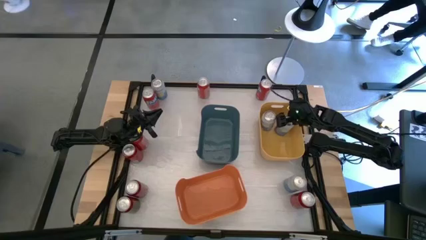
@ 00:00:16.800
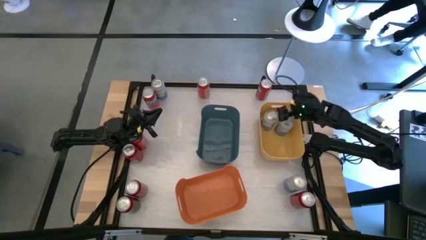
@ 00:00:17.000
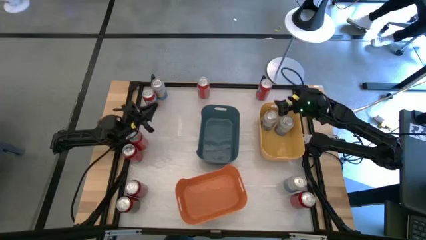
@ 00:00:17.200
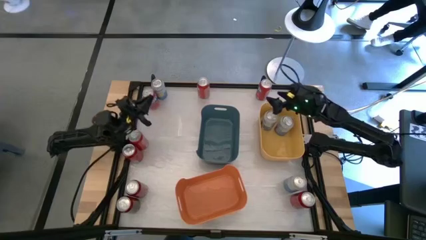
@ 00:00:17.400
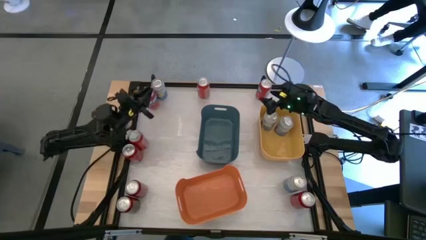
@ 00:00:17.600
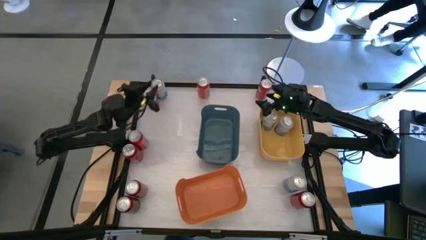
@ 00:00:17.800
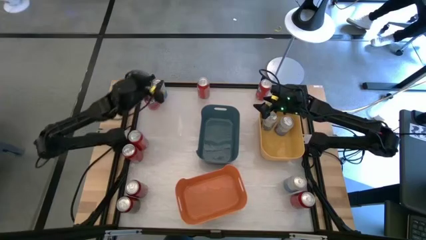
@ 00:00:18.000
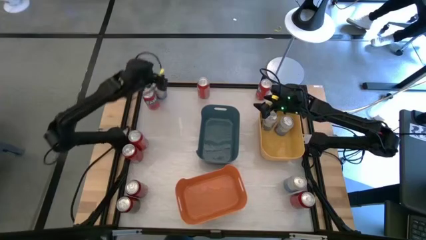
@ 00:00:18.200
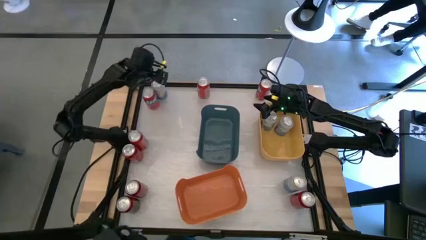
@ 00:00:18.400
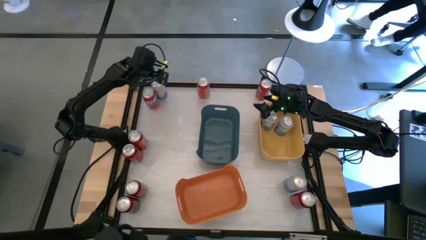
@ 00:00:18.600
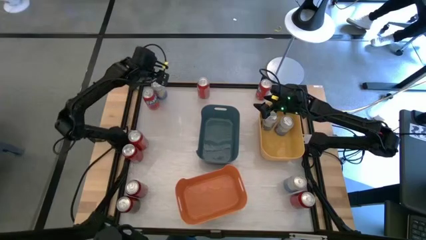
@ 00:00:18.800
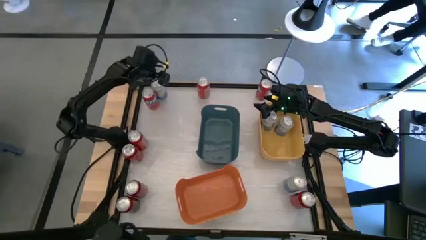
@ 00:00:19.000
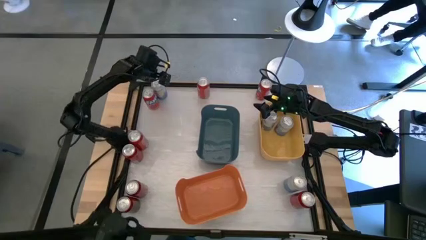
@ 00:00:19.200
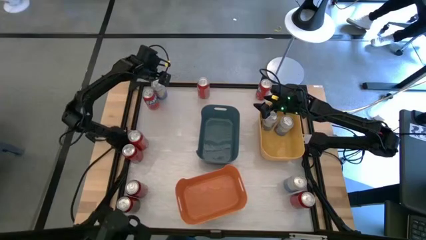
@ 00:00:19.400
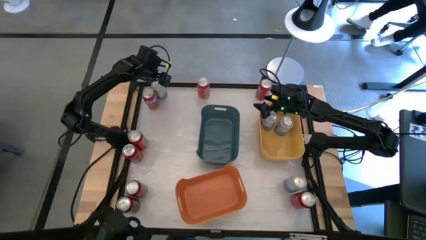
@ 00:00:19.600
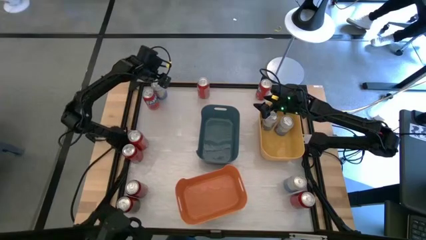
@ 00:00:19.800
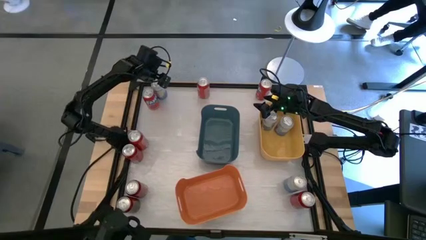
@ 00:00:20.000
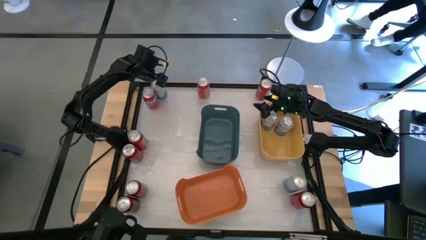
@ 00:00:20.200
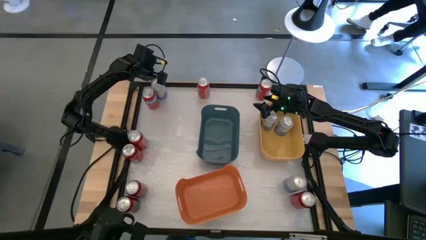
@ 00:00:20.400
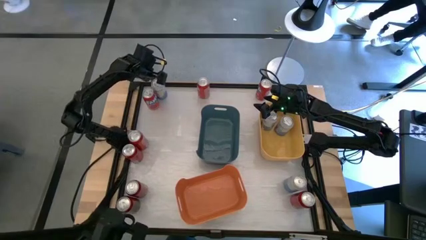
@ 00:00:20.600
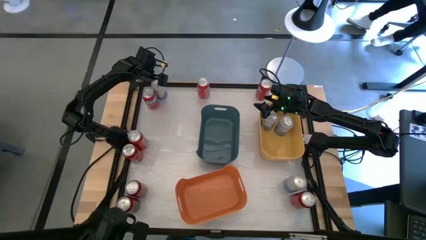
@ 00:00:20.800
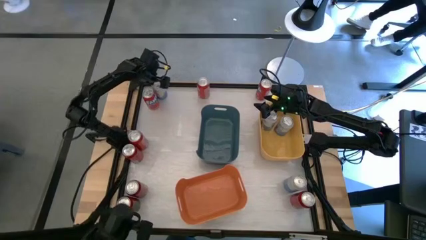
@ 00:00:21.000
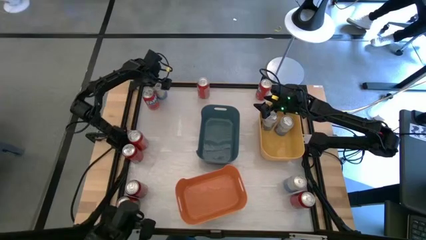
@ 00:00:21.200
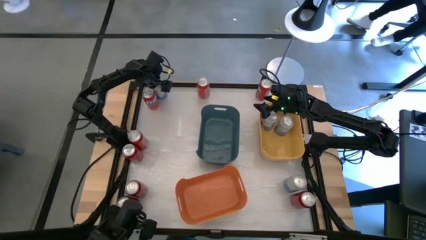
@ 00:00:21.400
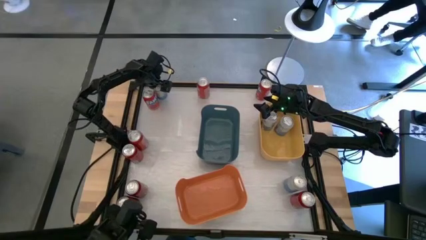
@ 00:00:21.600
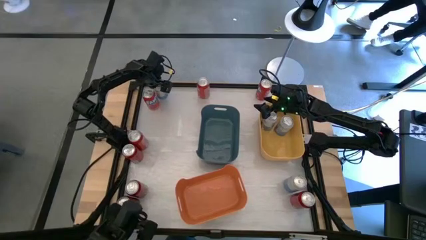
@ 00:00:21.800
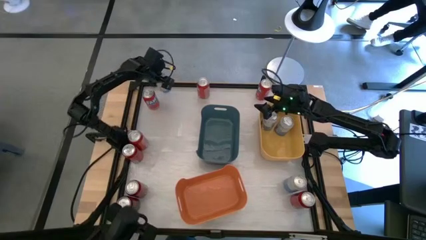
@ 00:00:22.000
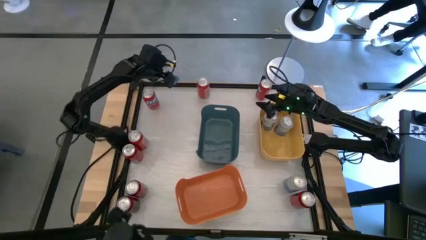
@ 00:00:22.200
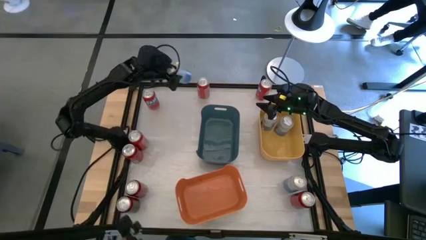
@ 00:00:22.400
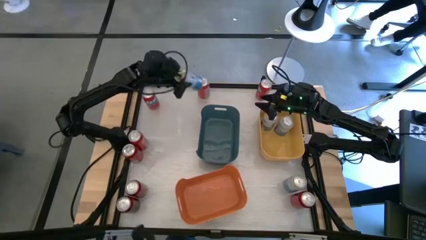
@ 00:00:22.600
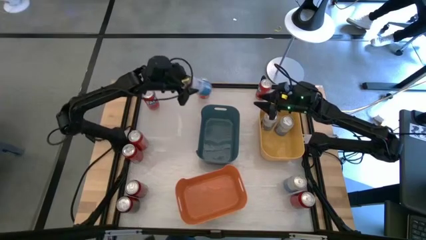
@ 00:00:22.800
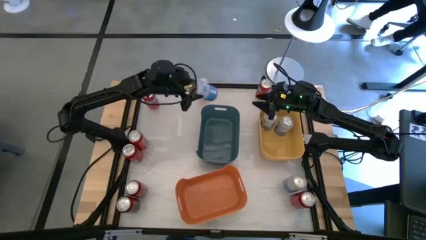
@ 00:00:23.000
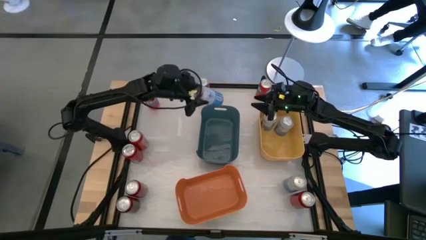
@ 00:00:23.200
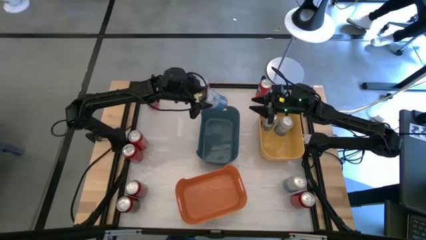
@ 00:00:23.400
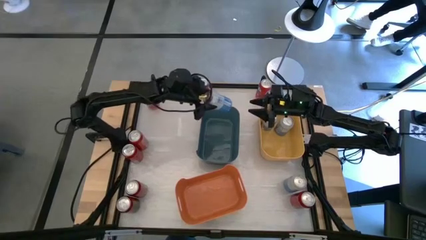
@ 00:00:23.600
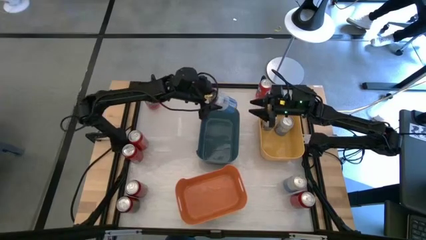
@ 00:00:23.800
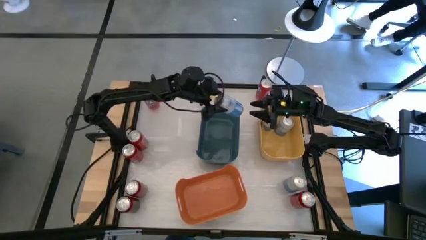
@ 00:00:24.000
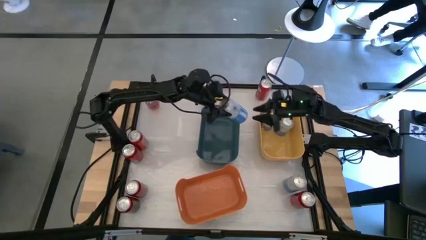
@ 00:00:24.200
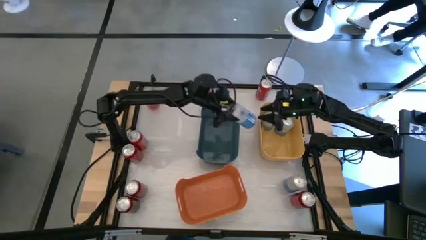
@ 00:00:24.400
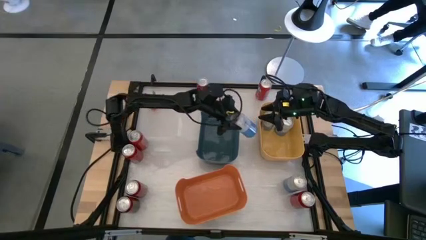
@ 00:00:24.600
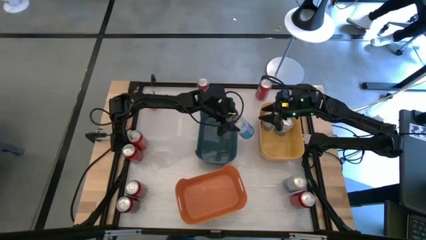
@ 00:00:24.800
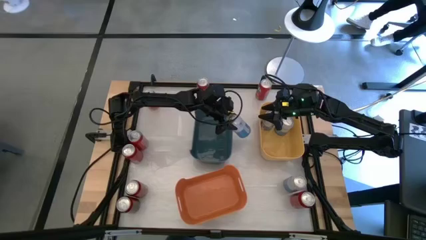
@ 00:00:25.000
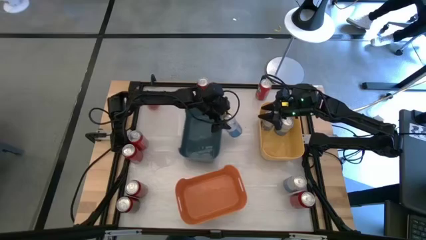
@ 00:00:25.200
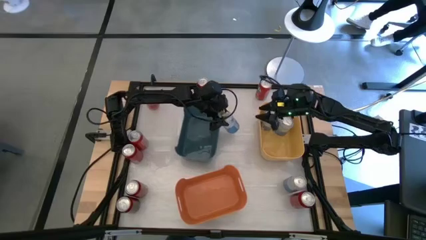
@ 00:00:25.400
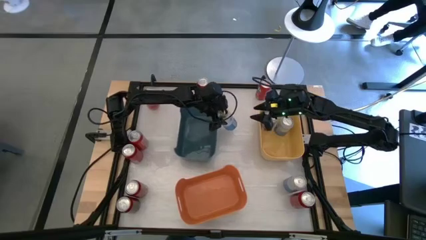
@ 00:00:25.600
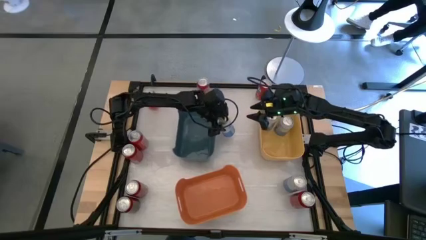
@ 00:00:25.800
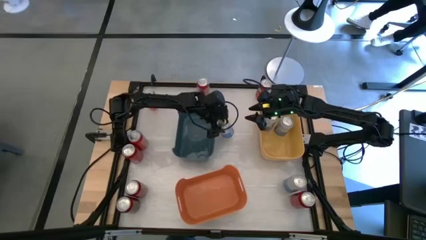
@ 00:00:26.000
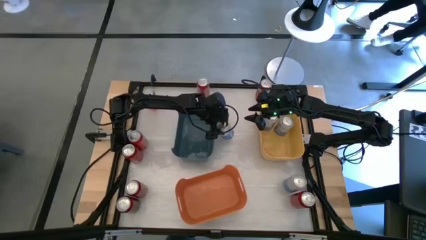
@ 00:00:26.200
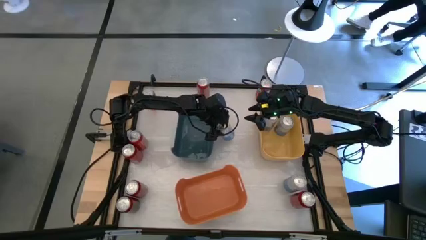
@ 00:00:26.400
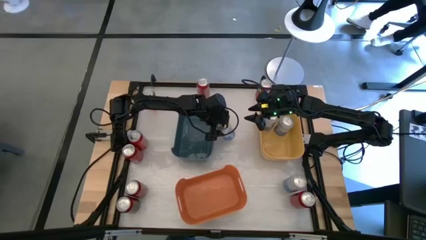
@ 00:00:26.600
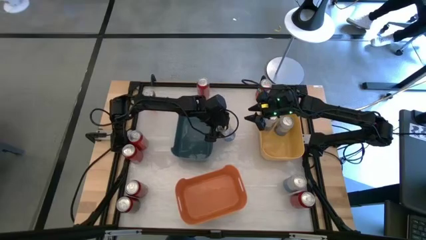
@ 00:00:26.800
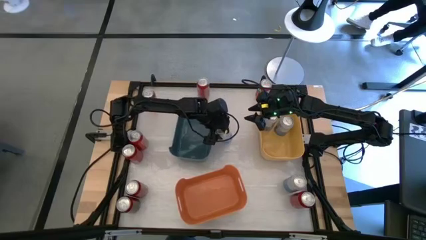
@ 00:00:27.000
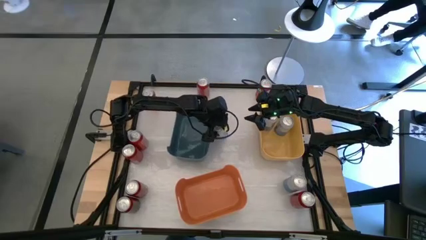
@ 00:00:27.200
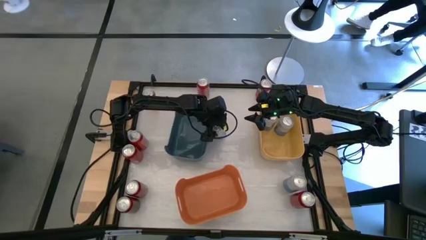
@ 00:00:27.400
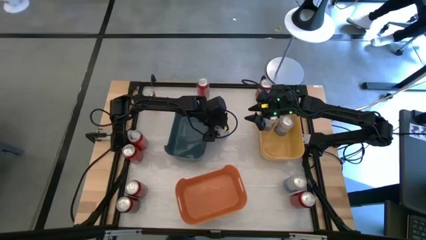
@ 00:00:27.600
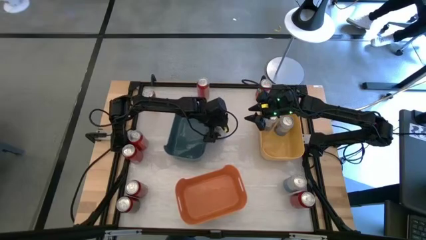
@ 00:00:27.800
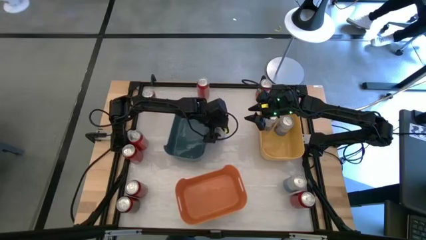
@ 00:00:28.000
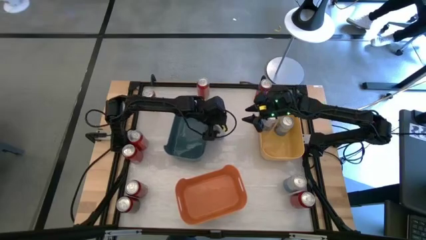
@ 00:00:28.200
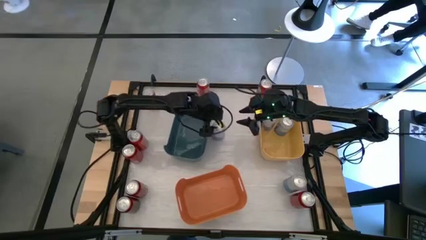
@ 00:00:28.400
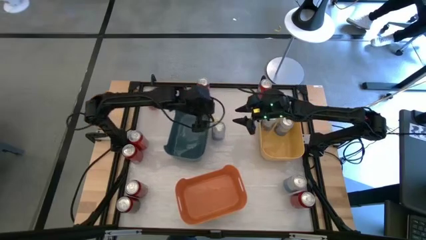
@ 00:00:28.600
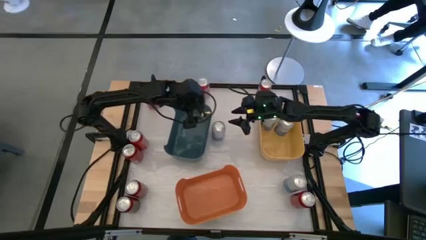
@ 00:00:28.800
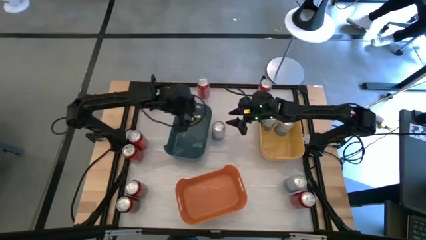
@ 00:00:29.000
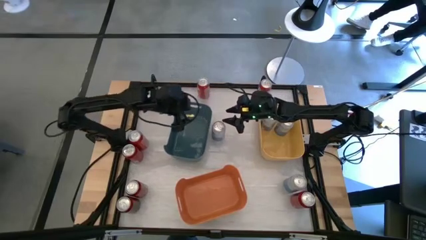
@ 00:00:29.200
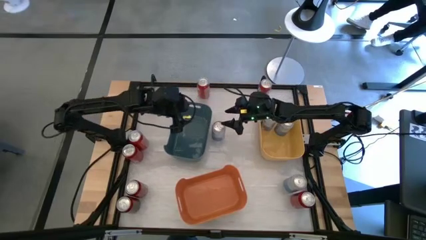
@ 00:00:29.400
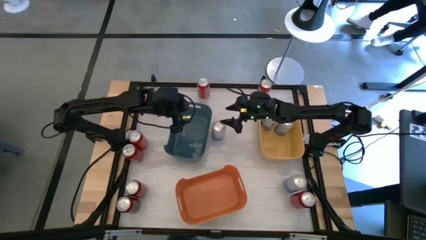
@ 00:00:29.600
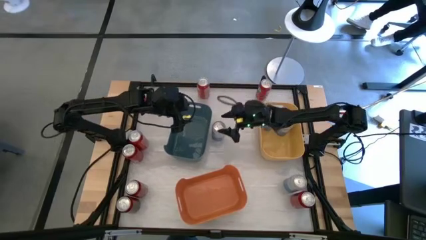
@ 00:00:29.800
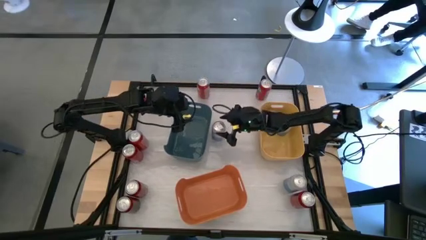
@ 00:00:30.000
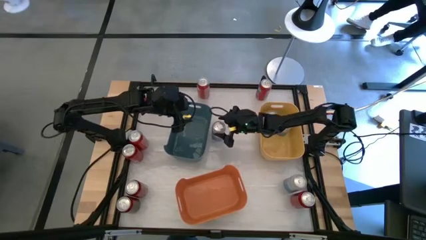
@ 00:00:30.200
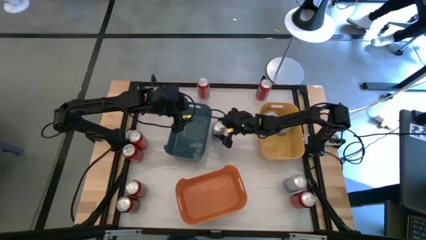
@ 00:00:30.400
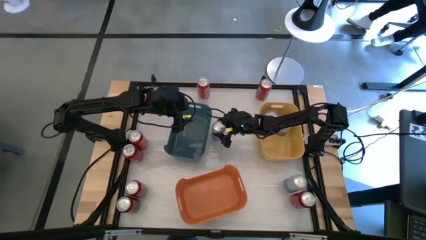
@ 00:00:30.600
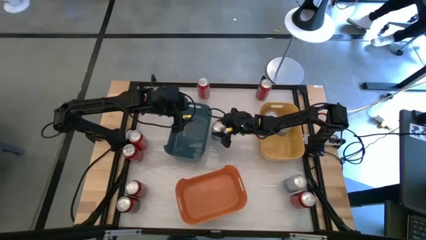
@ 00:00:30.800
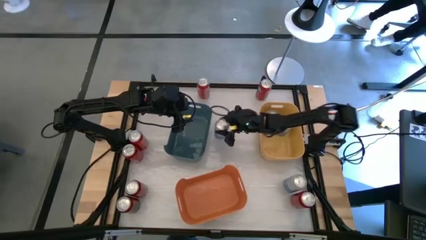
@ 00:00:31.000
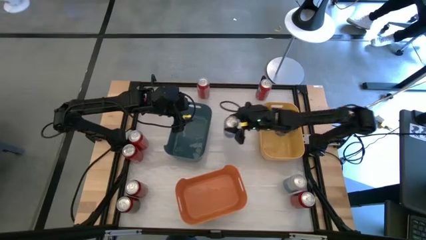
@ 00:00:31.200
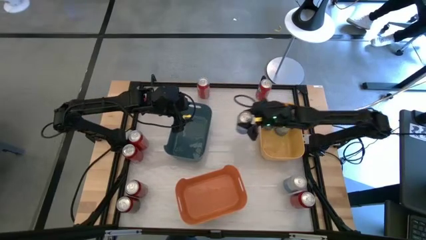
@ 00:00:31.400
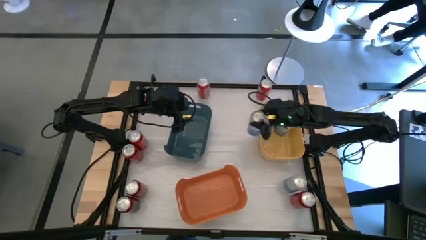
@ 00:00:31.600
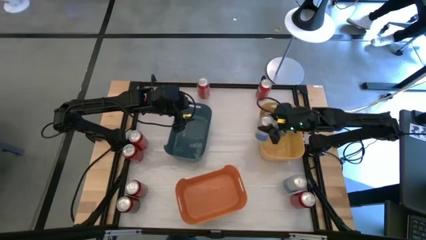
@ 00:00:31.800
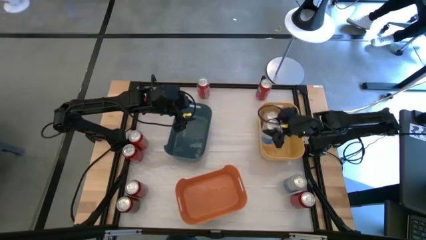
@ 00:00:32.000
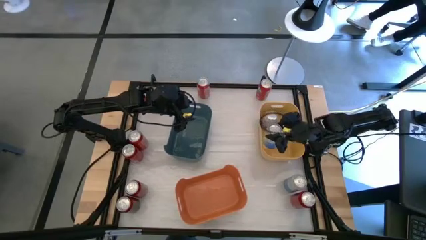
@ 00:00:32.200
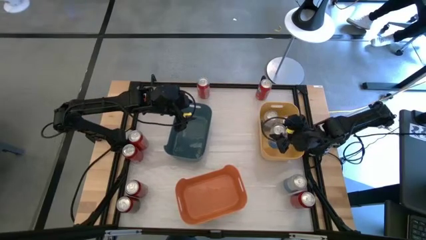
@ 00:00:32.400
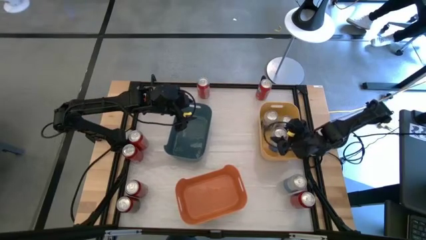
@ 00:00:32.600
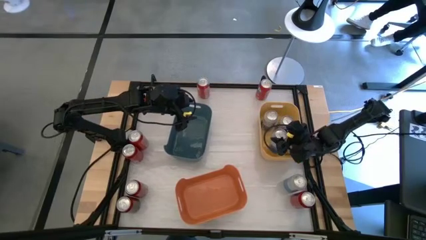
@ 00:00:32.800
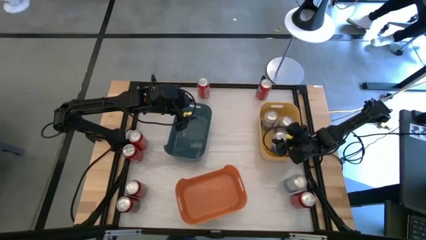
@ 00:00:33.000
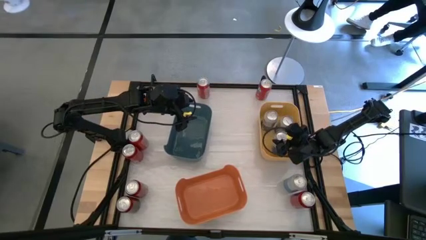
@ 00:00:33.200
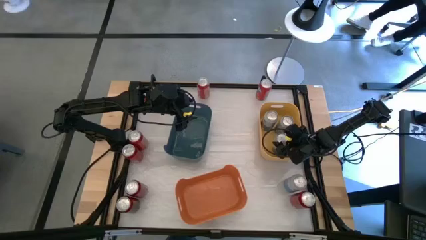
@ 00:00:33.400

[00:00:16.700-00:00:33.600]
Task: Sort soda cans
Put the top white soda can into the yellow bin
